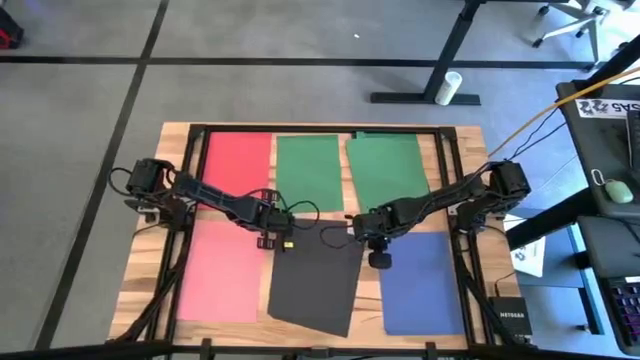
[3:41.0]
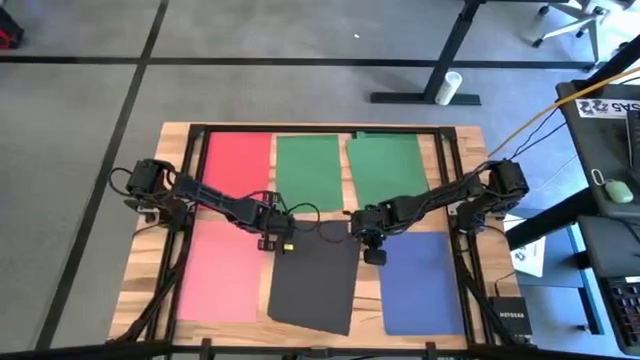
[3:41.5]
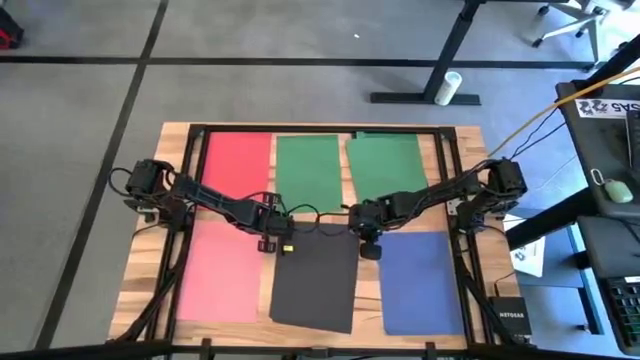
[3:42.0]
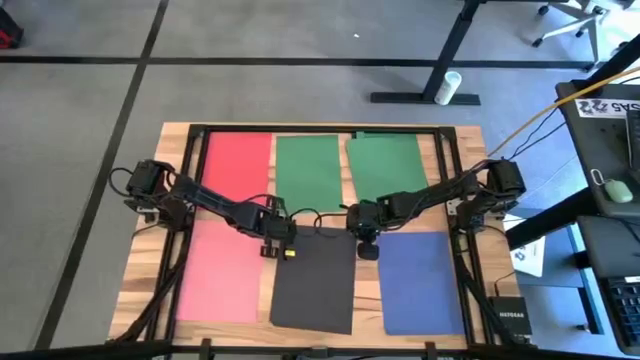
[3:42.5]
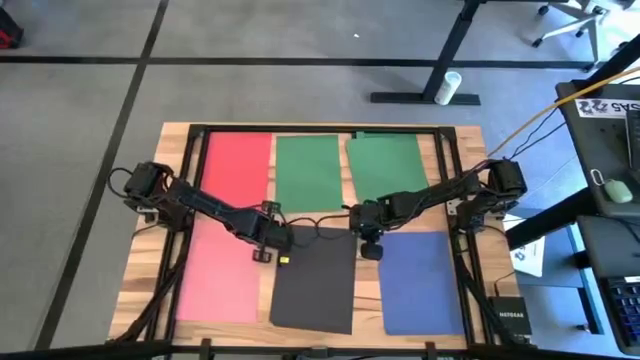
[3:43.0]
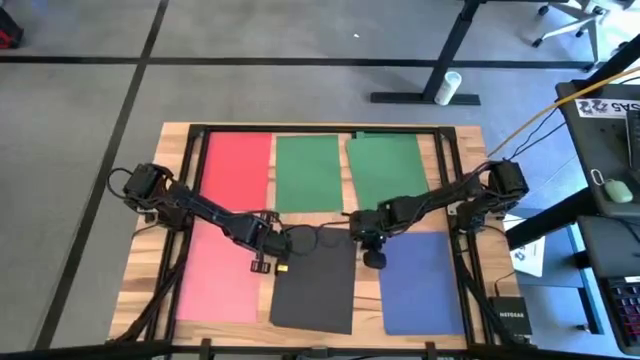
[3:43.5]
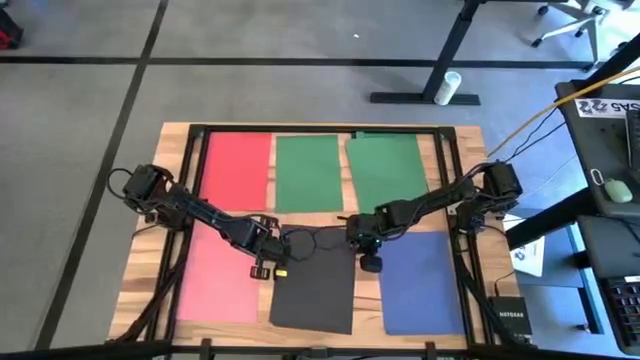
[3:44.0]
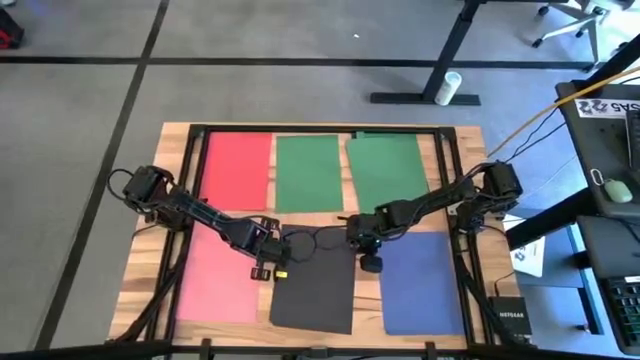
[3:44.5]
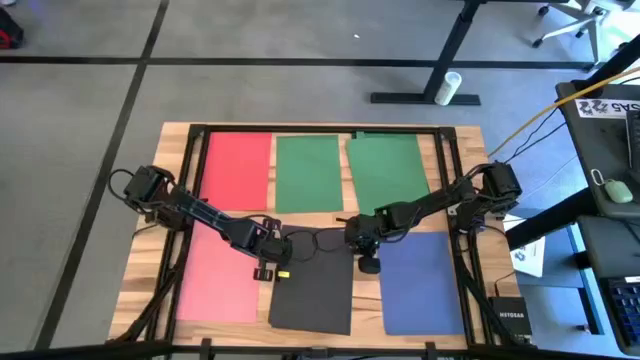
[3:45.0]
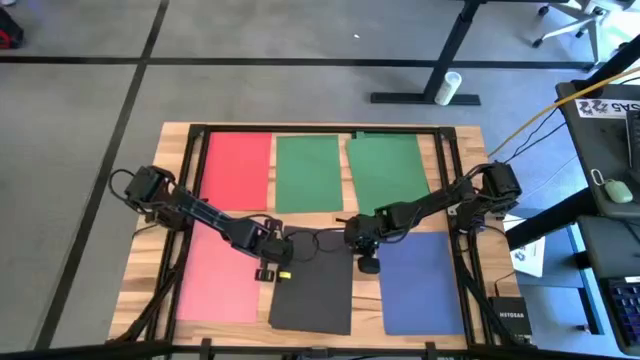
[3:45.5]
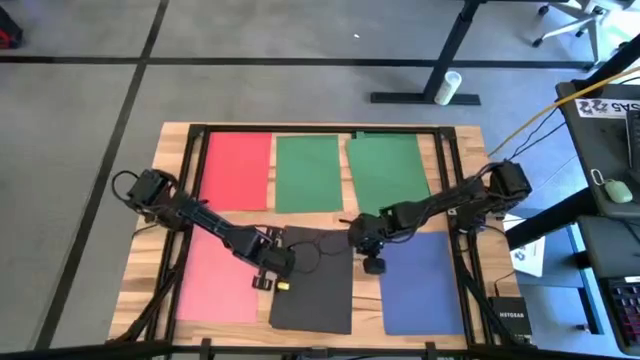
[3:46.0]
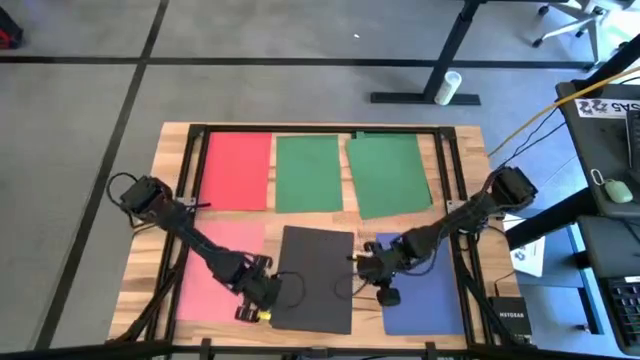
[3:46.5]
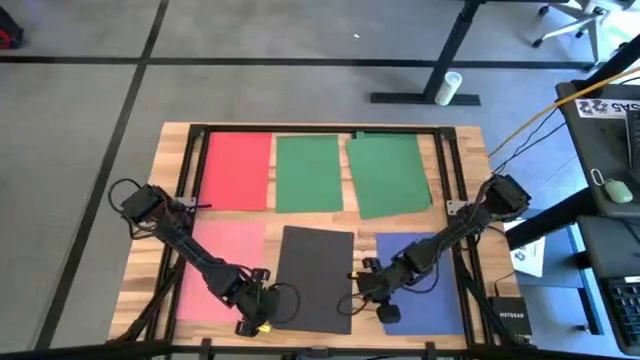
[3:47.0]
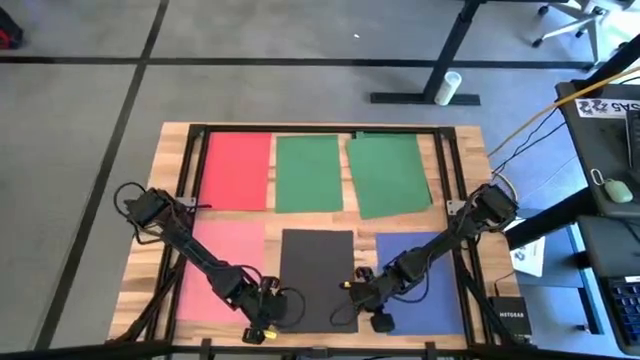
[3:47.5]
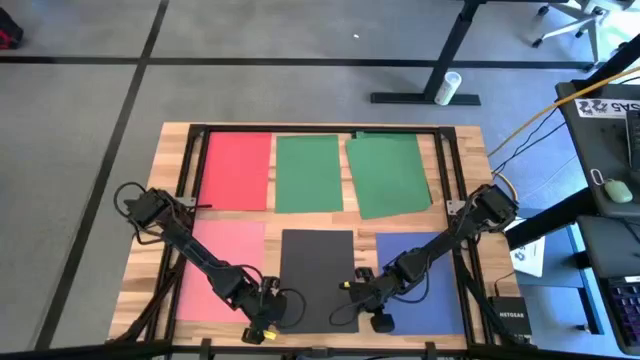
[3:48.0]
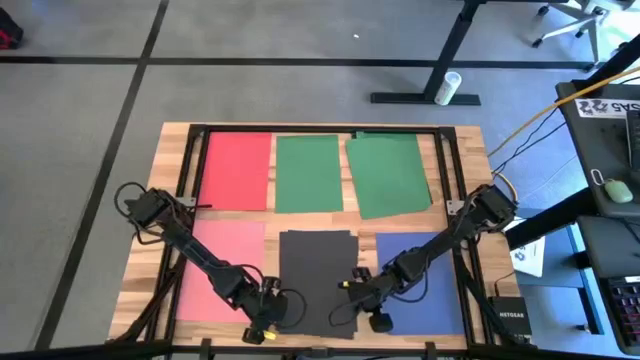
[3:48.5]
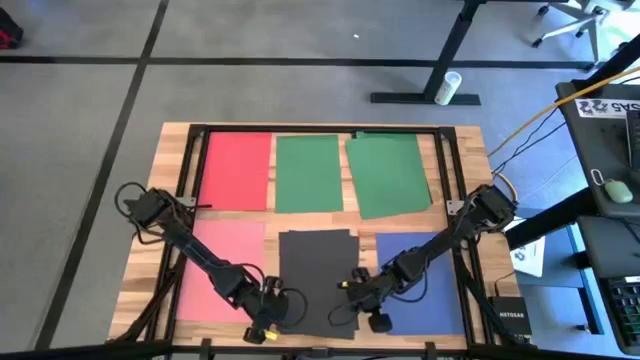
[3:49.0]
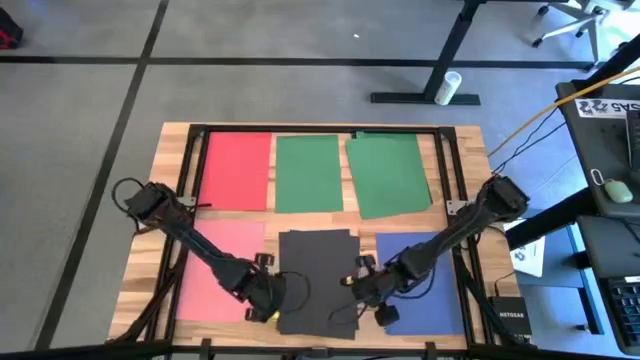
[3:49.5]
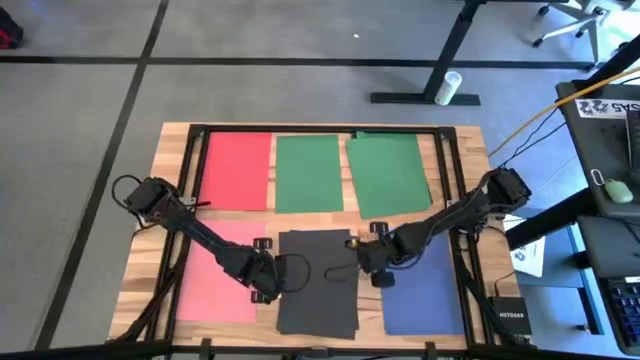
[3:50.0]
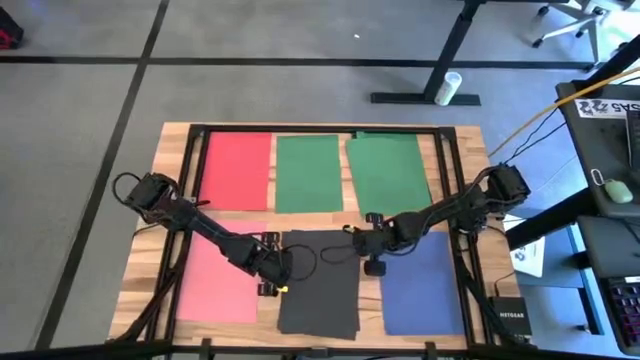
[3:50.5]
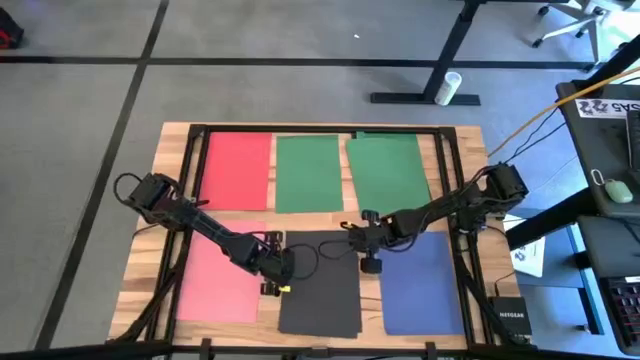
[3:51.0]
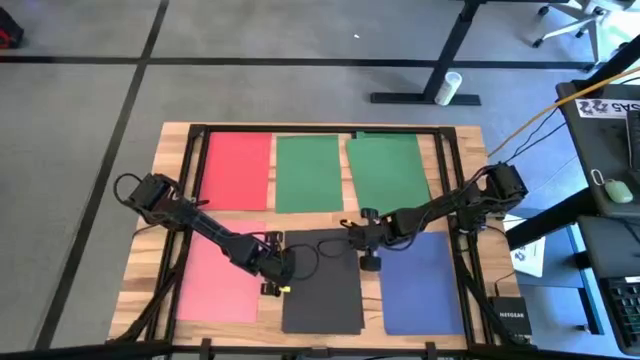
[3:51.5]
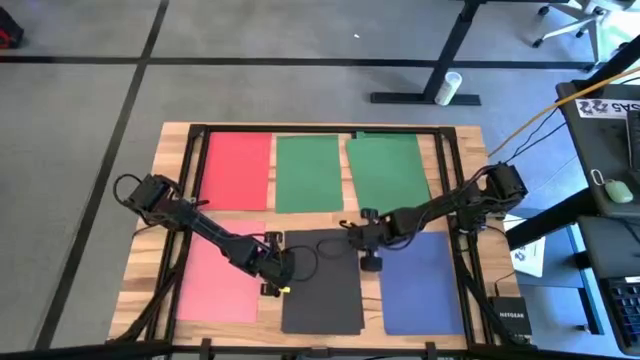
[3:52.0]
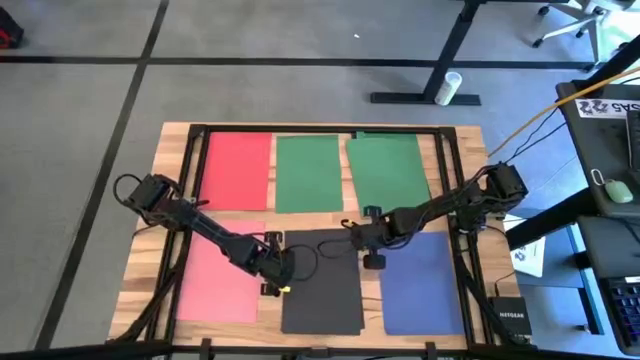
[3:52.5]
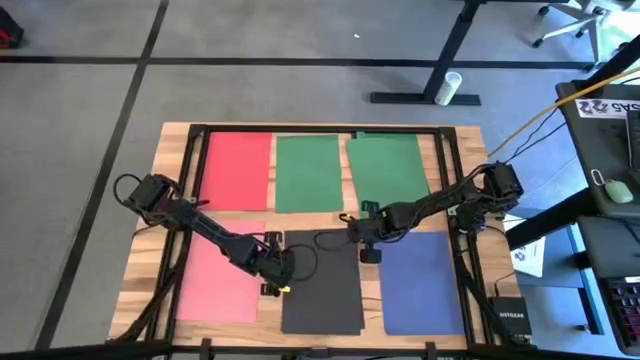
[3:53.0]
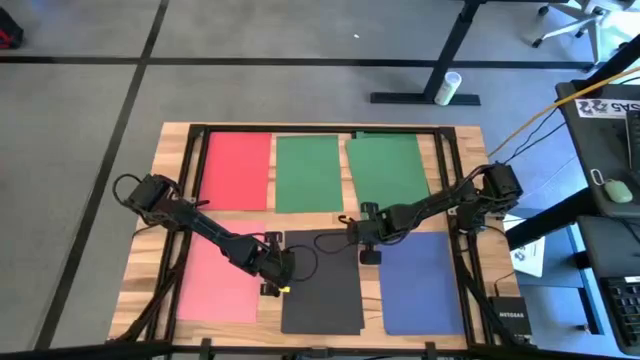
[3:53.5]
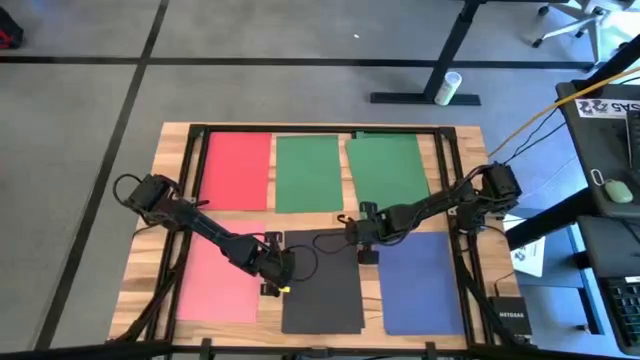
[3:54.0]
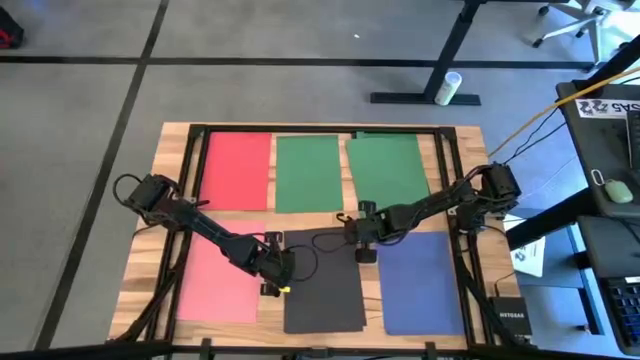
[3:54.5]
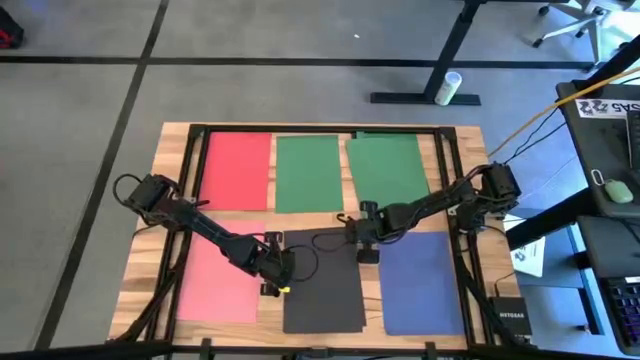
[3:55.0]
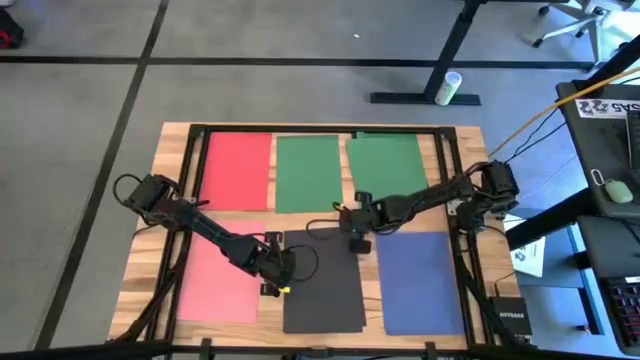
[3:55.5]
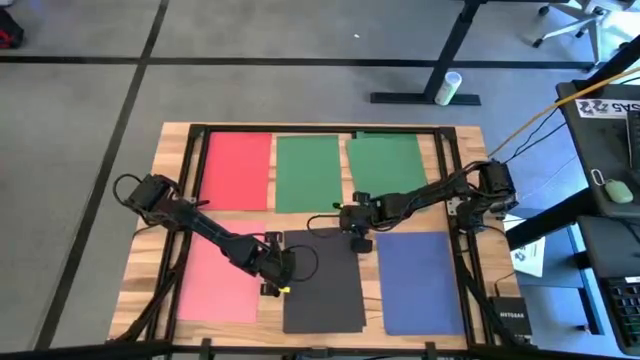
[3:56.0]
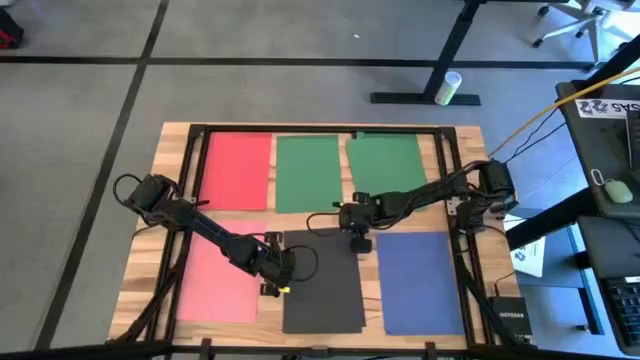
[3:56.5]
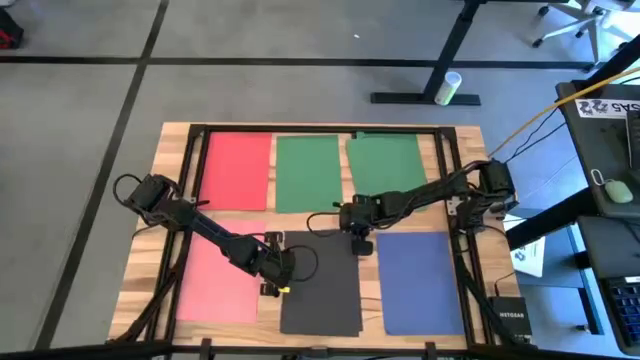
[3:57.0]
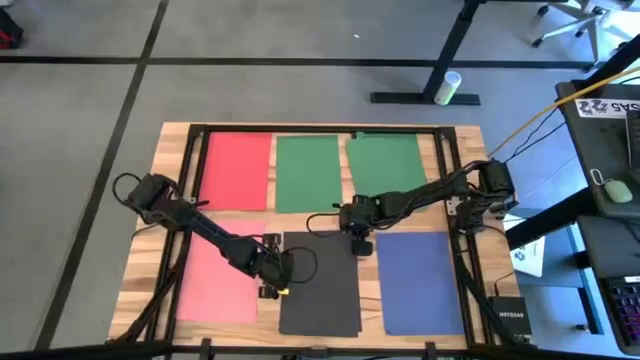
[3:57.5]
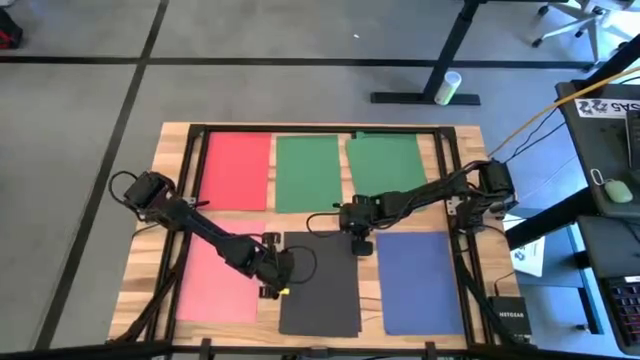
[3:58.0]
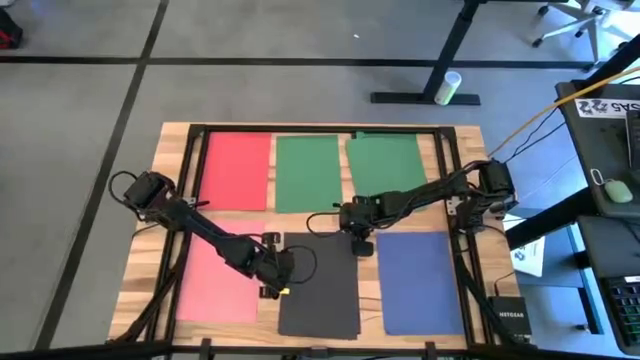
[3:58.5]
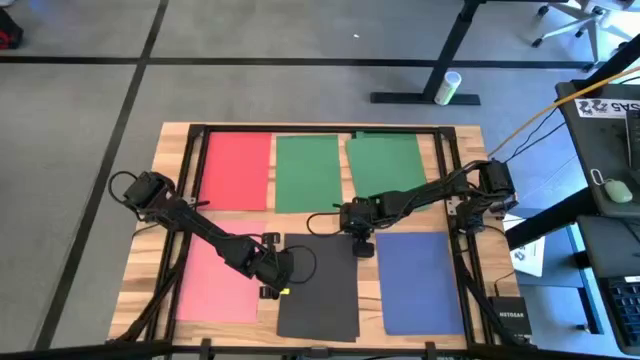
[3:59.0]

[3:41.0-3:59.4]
Task: Organize paper
Stack the black paper on top of the black paper

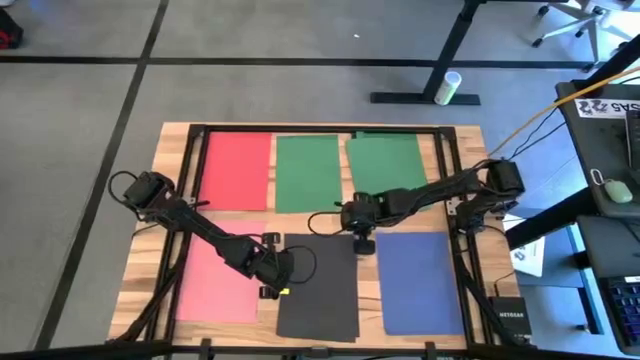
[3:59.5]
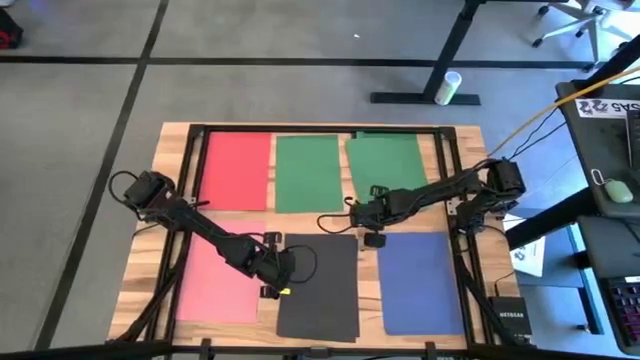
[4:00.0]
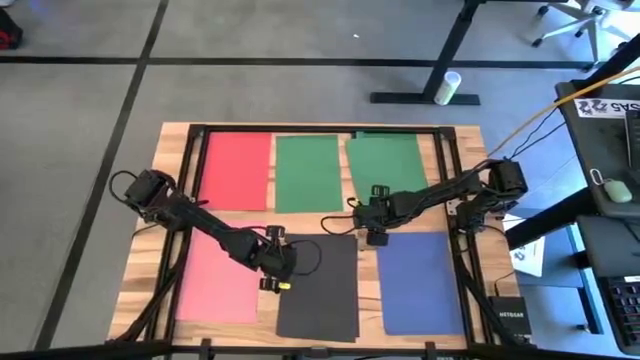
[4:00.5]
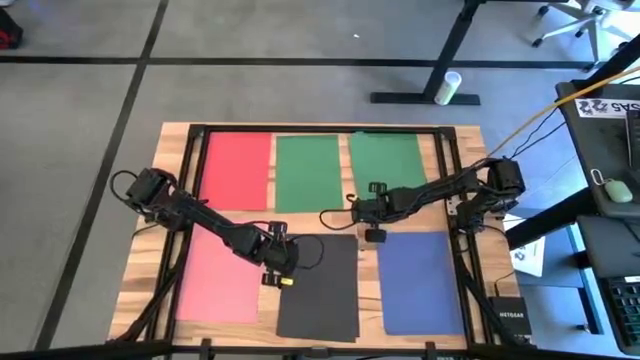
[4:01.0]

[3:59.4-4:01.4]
Stack the green paper on top of the green paper

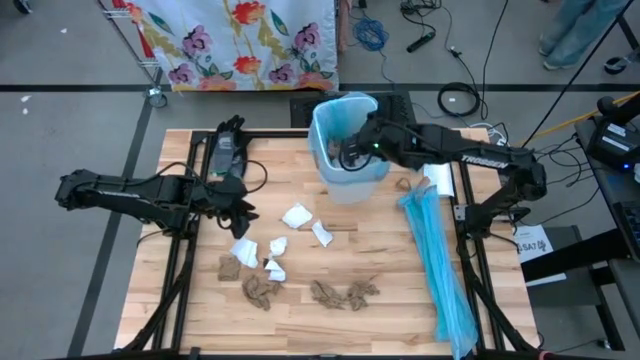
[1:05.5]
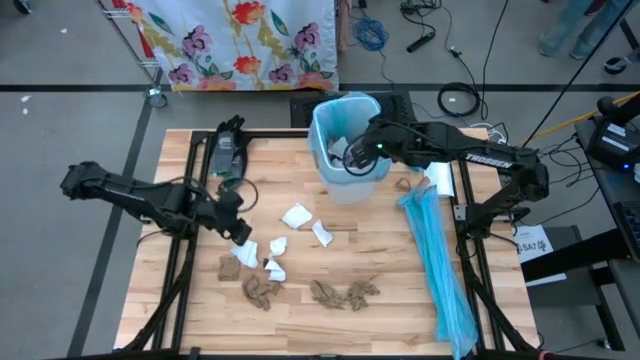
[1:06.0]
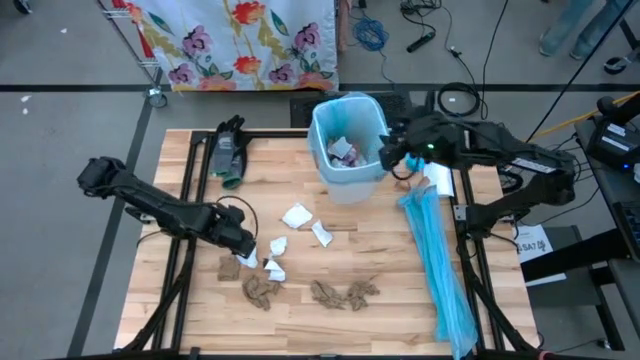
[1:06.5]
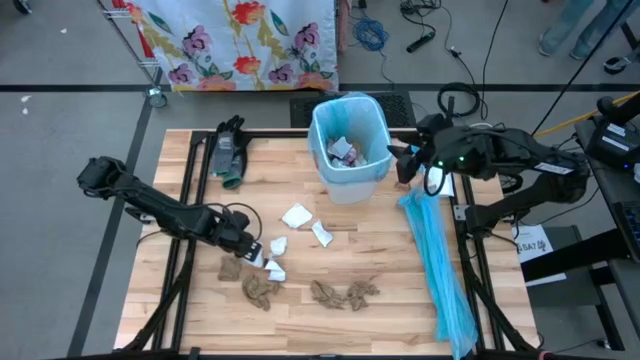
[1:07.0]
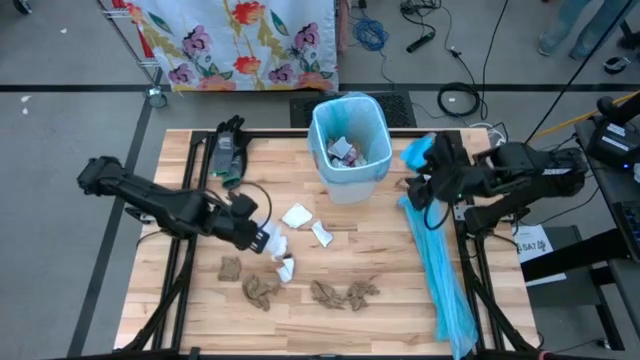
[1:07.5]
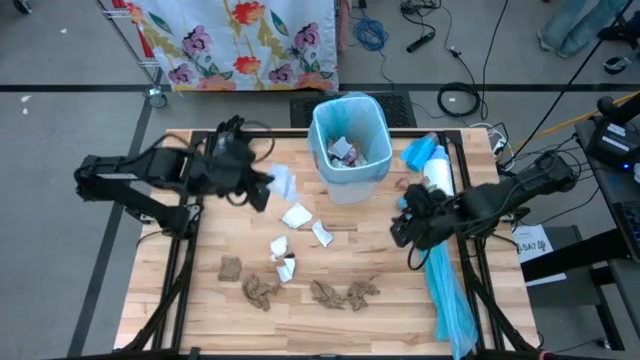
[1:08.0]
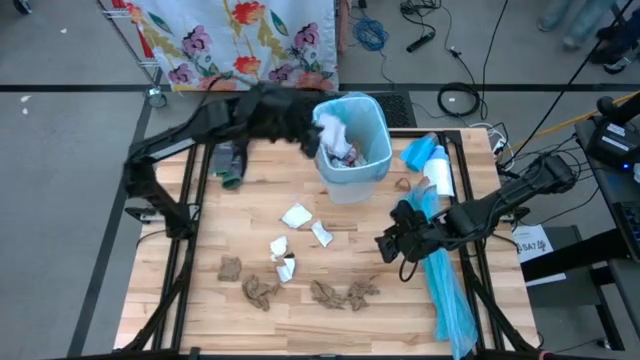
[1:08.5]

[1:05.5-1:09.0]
Task: place trash/remove bag and relplace
Put the piece of magazine into the trash bin
